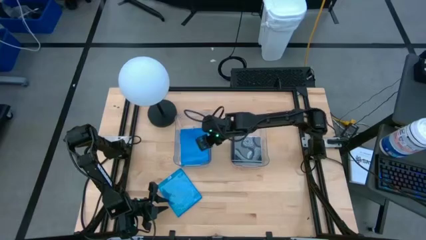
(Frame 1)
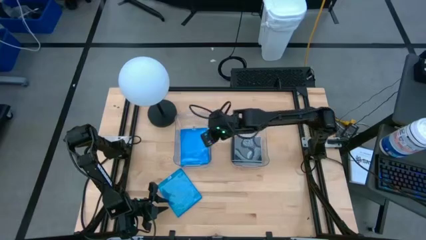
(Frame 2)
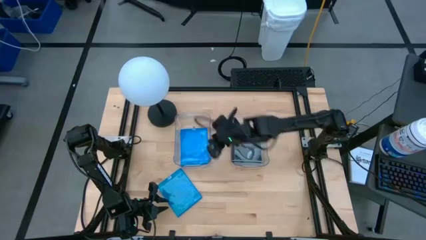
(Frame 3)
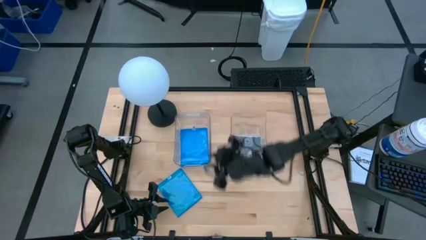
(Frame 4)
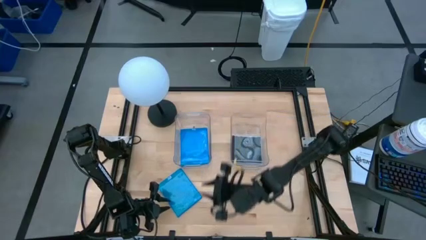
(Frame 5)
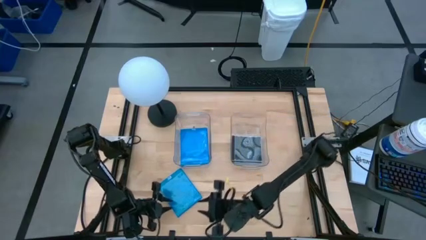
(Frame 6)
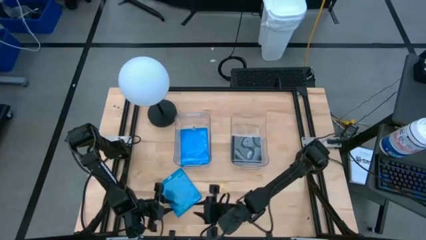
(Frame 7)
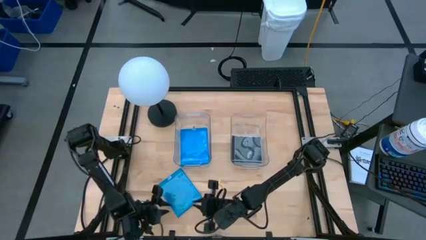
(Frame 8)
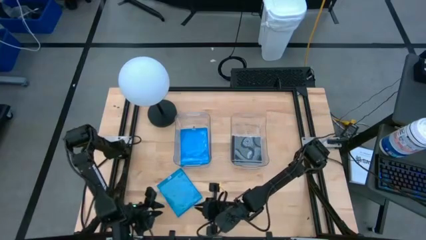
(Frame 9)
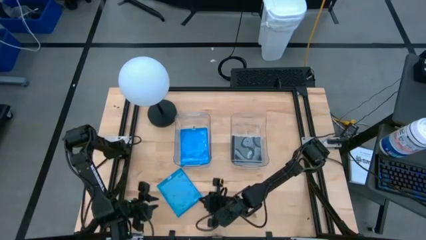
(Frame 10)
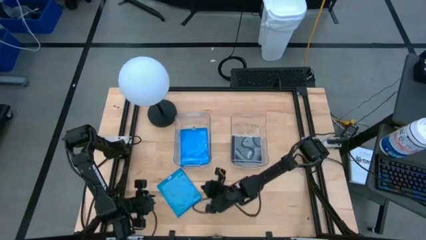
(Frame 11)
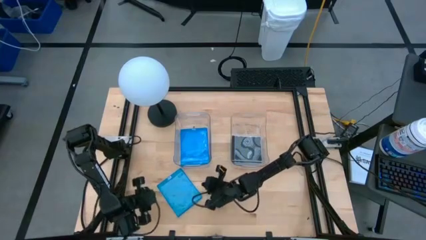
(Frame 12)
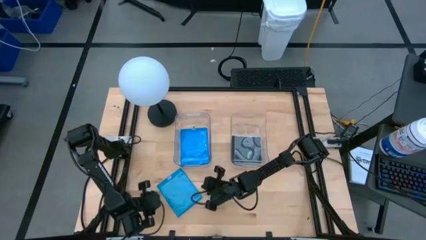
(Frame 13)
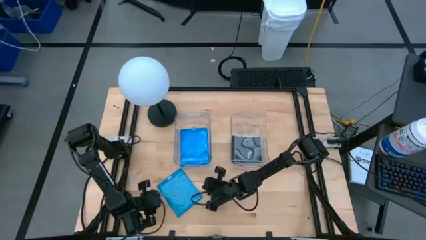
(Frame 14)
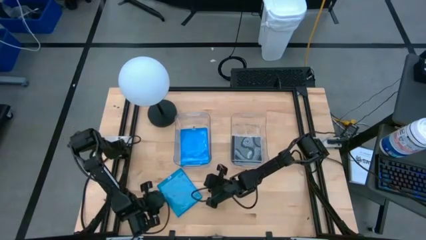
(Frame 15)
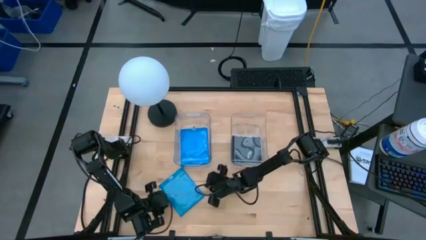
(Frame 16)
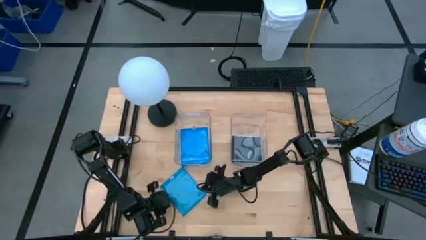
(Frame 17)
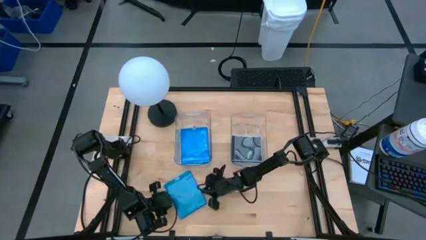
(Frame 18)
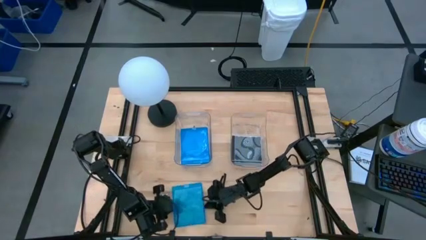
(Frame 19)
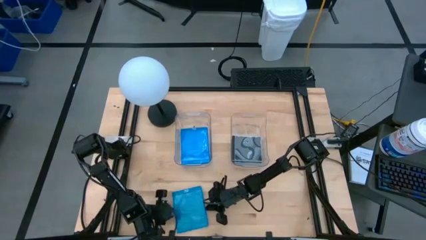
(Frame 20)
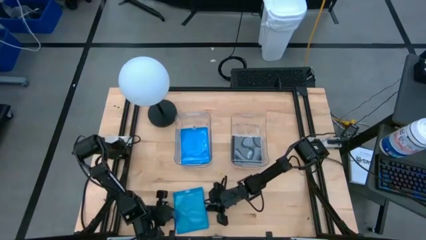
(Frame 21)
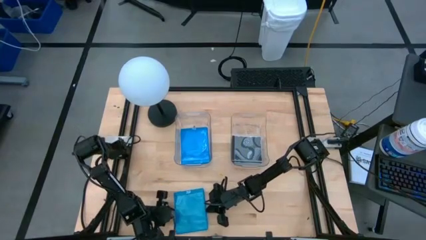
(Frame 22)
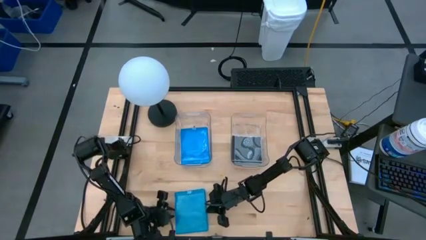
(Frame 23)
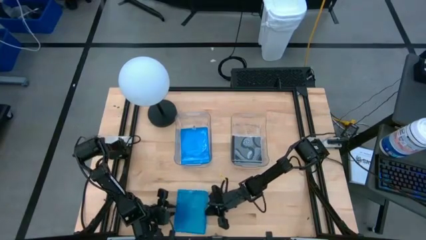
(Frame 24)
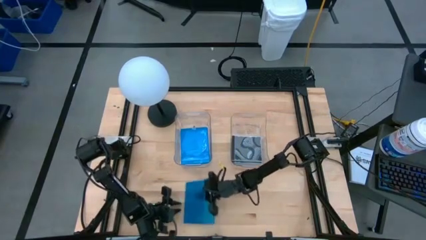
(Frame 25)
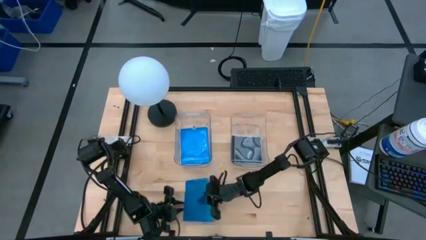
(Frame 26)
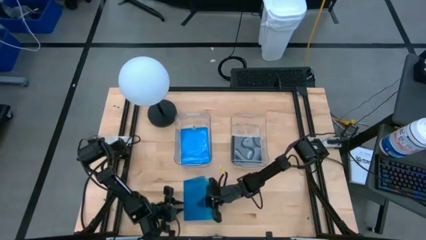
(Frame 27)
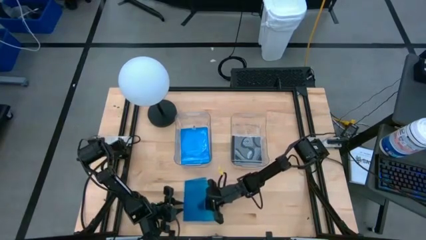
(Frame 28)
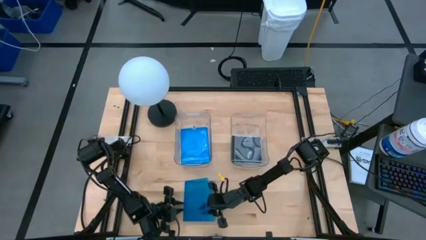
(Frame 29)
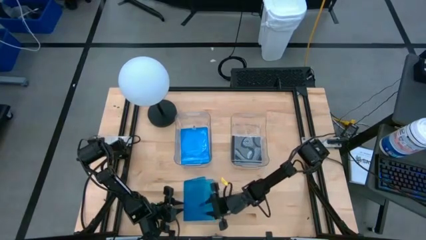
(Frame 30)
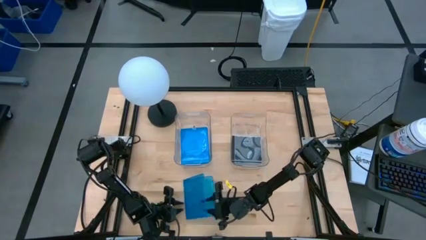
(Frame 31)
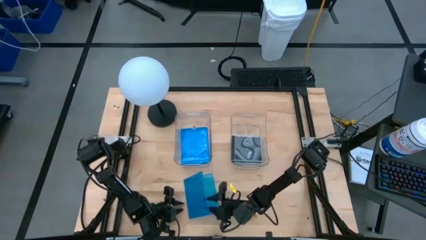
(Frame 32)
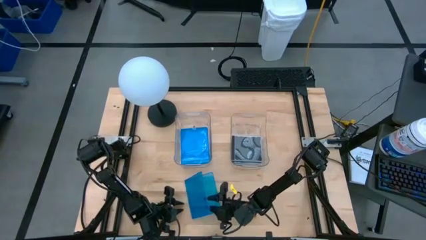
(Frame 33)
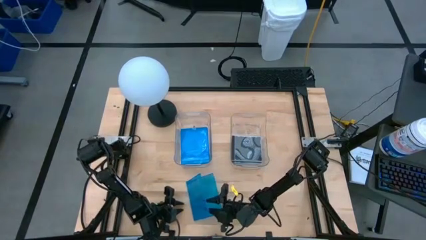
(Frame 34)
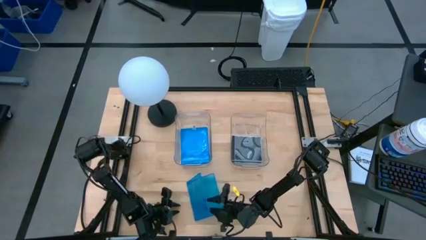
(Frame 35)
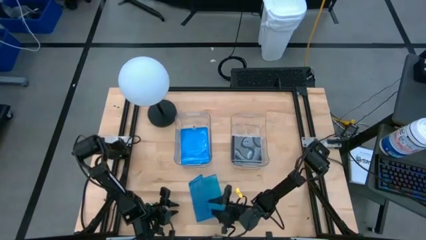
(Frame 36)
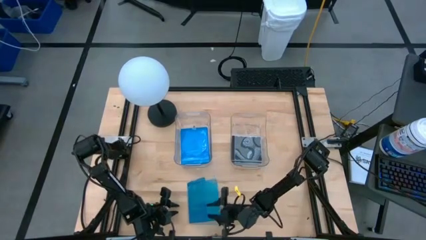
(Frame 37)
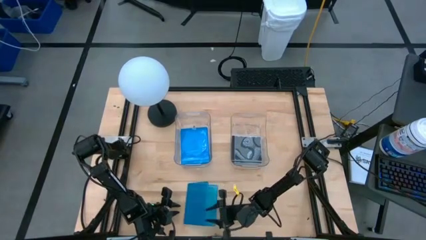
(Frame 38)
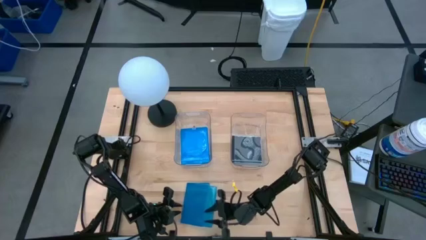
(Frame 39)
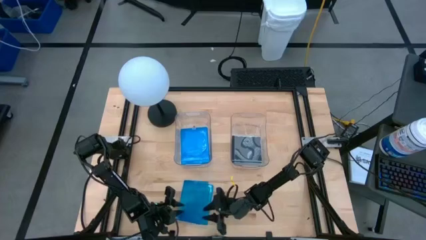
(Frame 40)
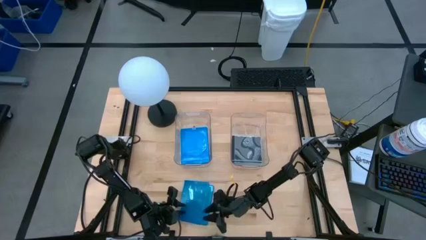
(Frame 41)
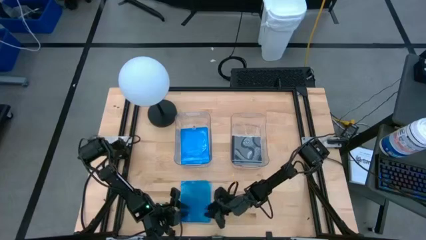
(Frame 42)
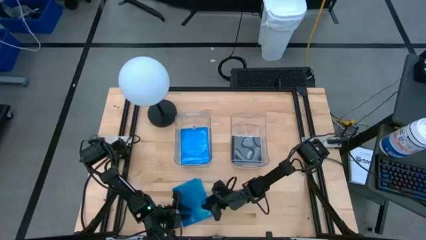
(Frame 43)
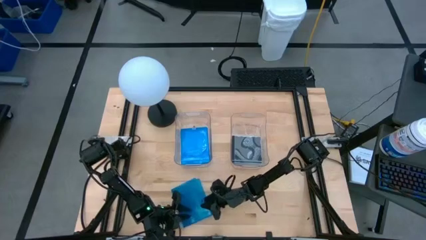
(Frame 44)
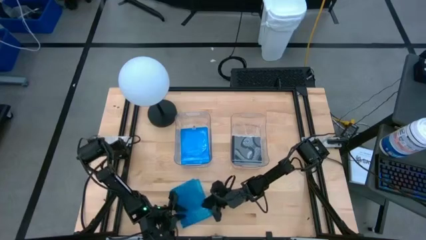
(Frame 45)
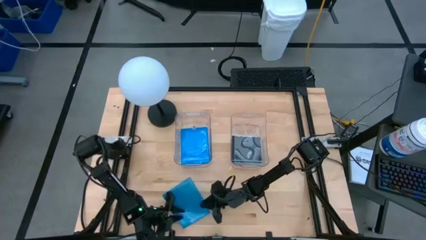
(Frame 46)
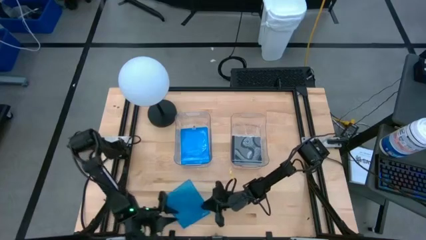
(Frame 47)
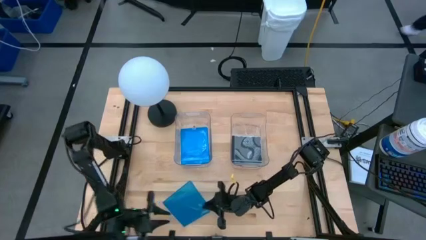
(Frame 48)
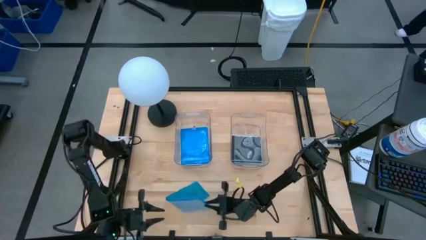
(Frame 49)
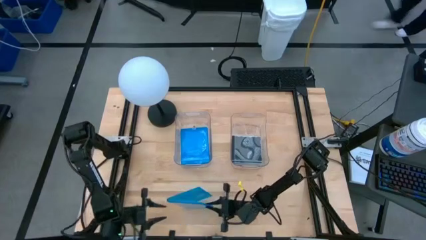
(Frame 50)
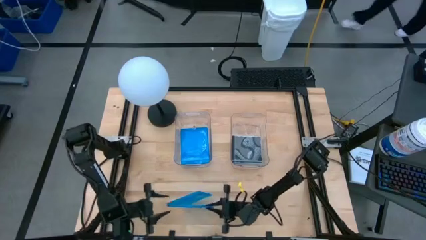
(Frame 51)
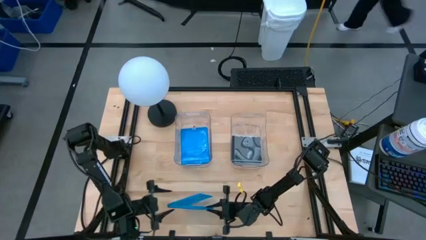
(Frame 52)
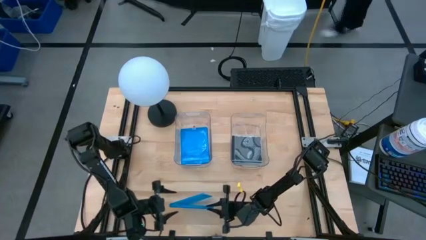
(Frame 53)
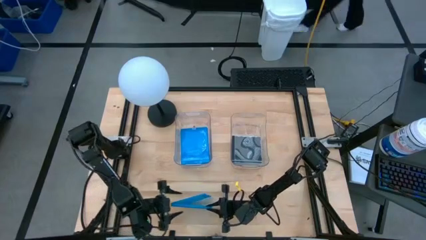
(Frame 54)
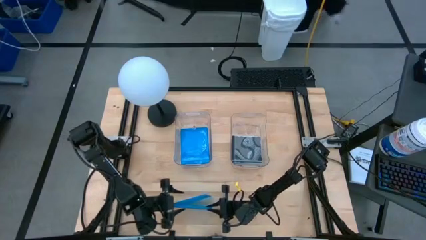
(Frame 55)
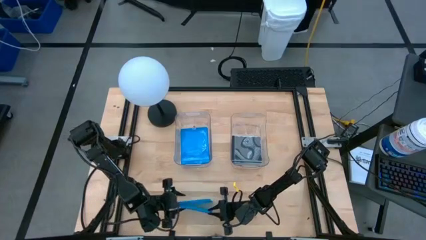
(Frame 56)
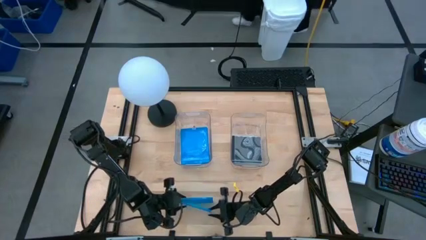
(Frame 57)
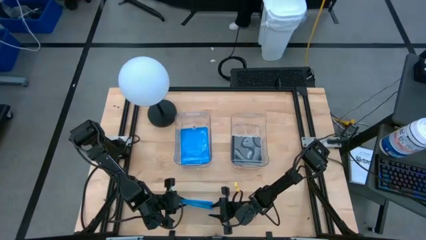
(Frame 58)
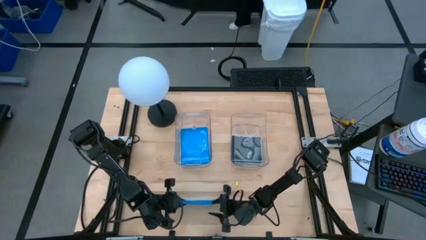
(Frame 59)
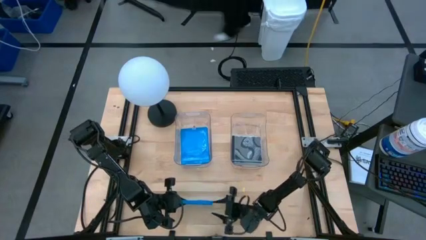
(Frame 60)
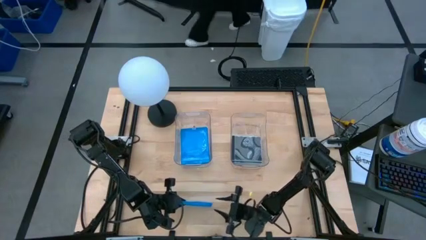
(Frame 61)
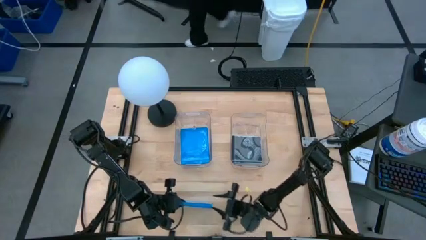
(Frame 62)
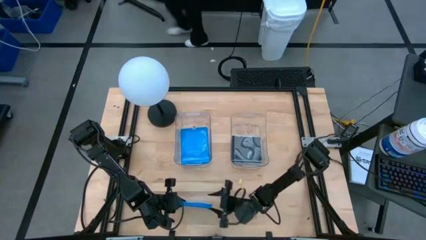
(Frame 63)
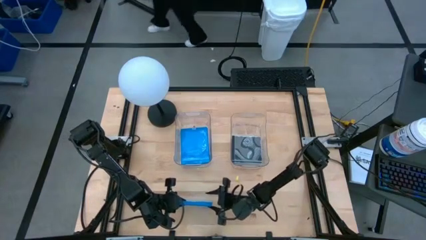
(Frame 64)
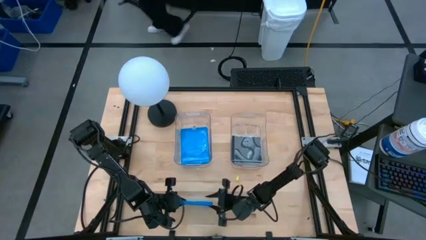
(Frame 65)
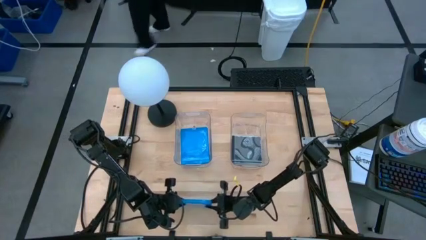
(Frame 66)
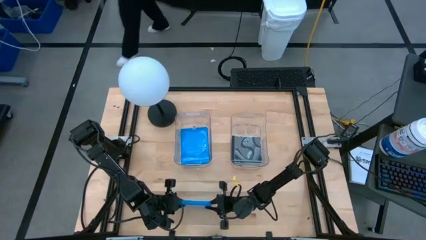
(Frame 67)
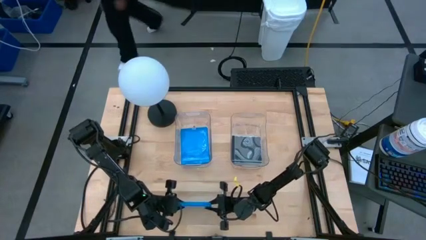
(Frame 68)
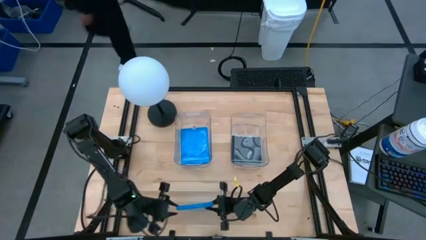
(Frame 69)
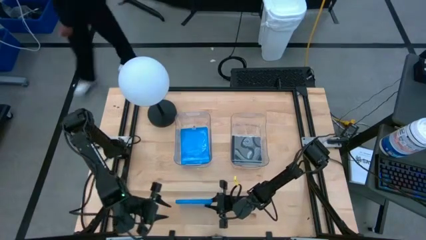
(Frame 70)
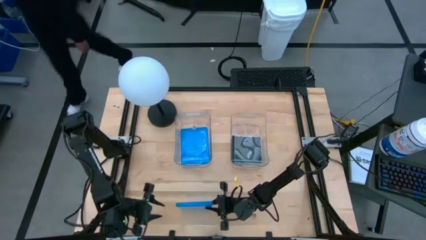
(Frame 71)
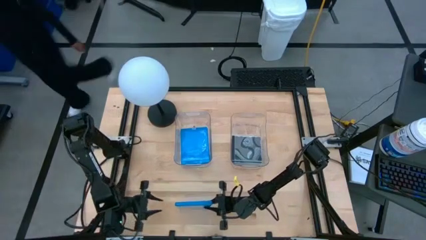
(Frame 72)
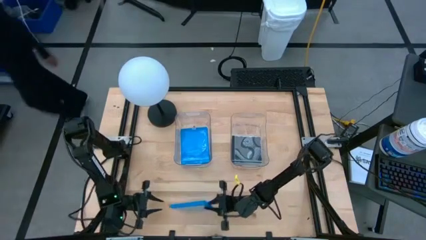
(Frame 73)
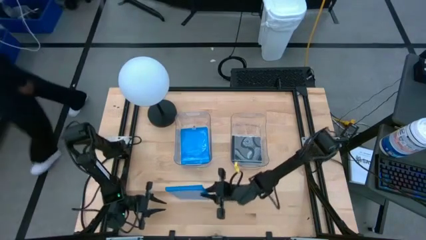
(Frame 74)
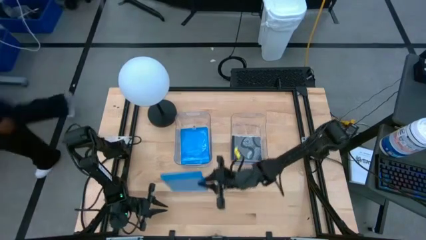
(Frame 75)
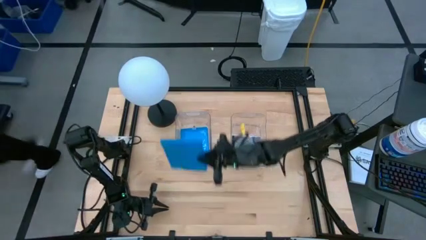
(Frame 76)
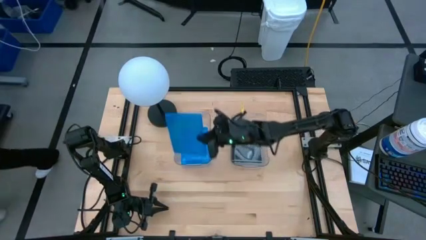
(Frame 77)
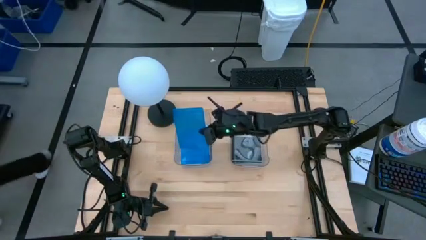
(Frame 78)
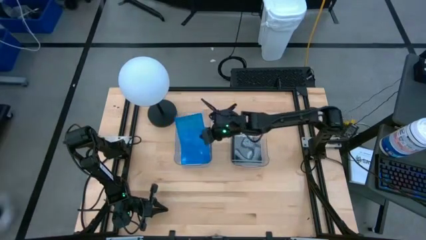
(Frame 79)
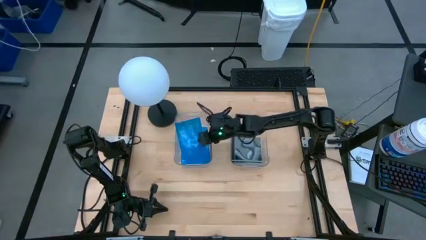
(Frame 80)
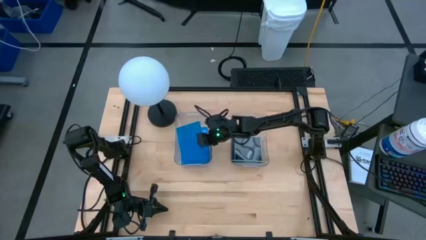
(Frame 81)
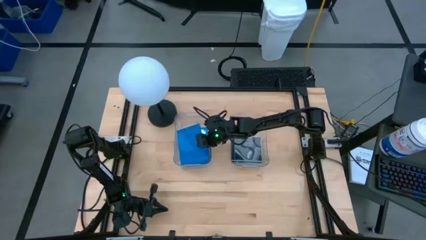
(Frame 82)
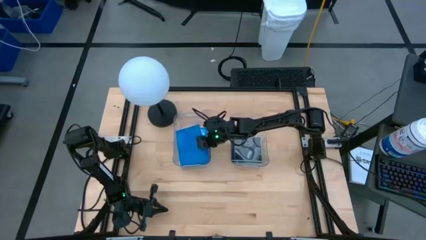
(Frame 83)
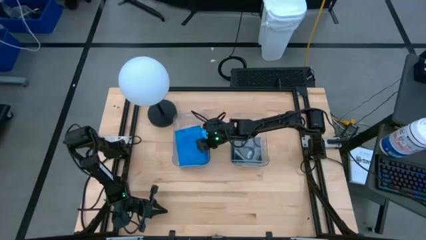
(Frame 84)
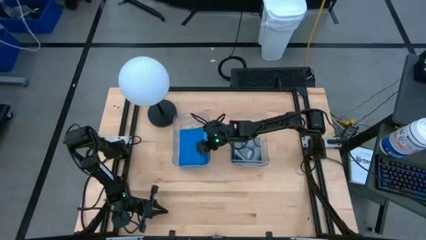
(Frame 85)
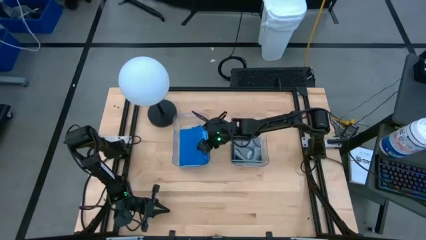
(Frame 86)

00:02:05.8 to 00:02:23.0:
Task: Pick & place jewel cases by type
Put the blue CD case into the left transparent bin
